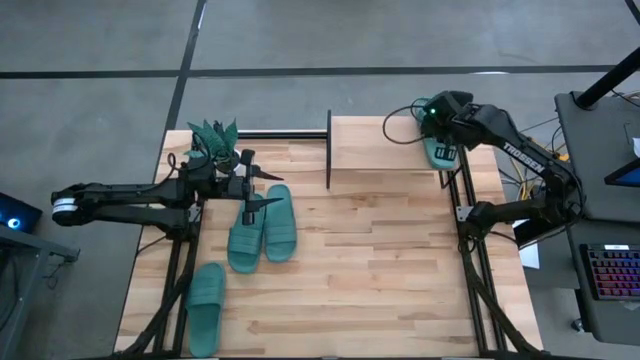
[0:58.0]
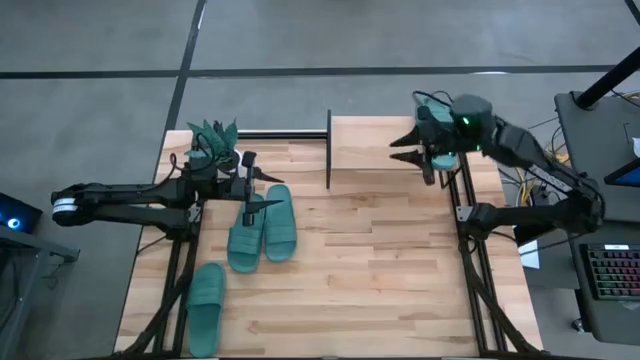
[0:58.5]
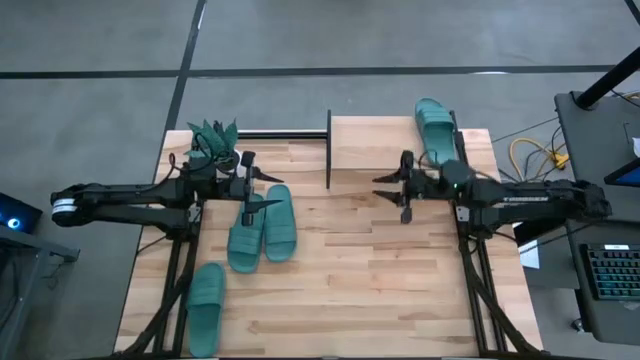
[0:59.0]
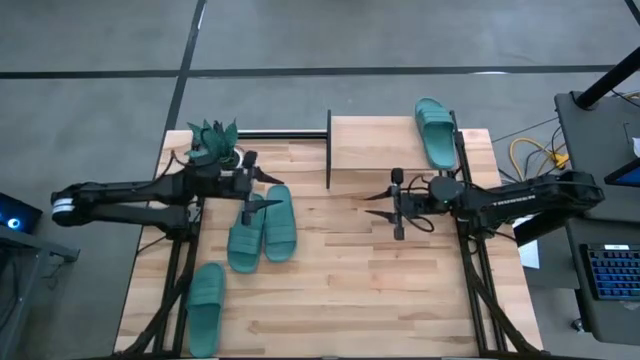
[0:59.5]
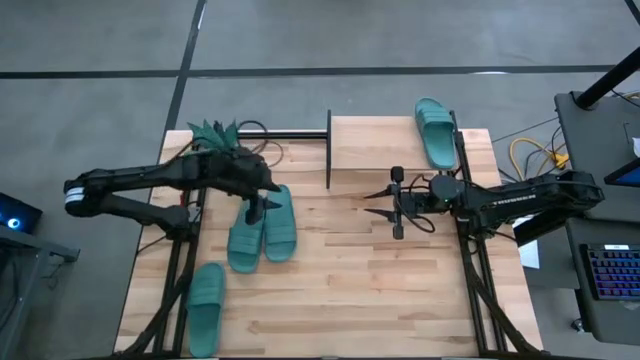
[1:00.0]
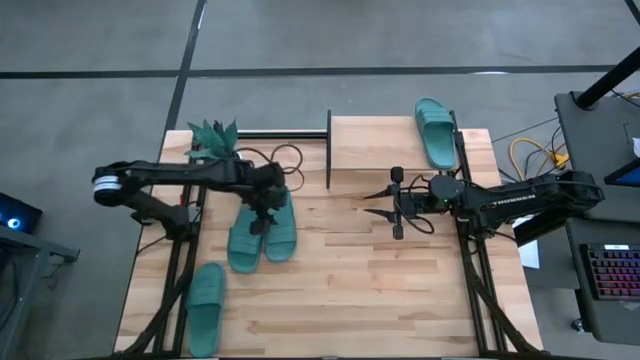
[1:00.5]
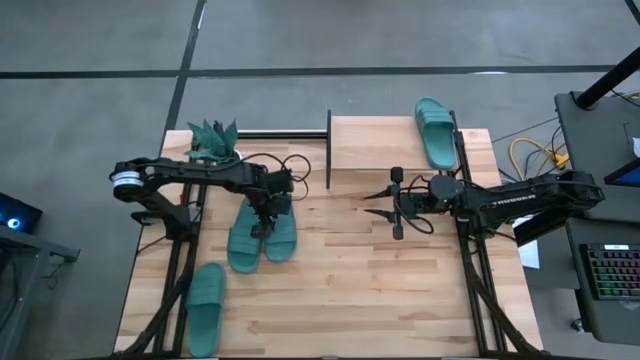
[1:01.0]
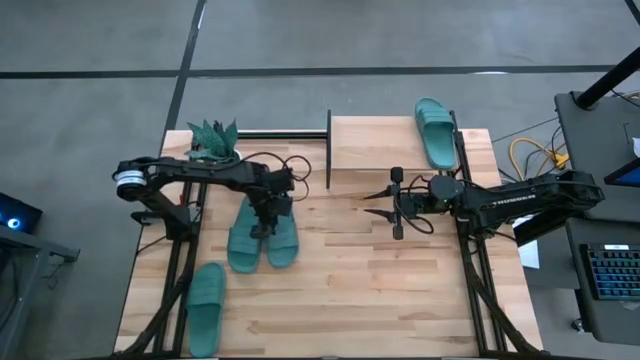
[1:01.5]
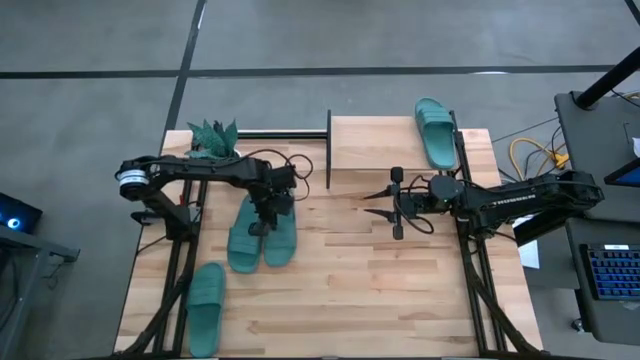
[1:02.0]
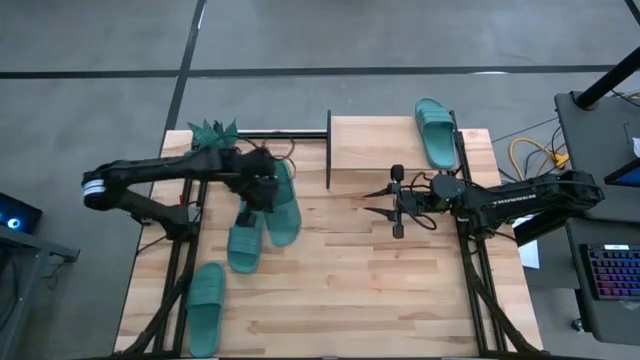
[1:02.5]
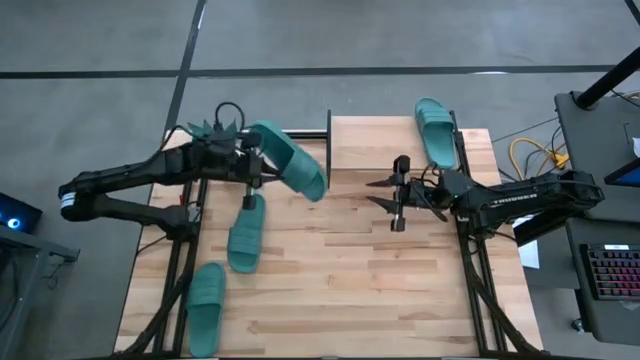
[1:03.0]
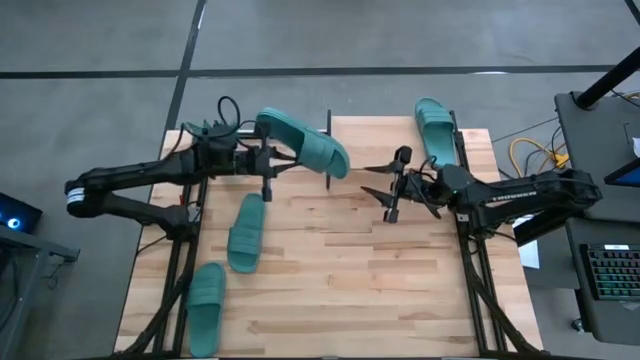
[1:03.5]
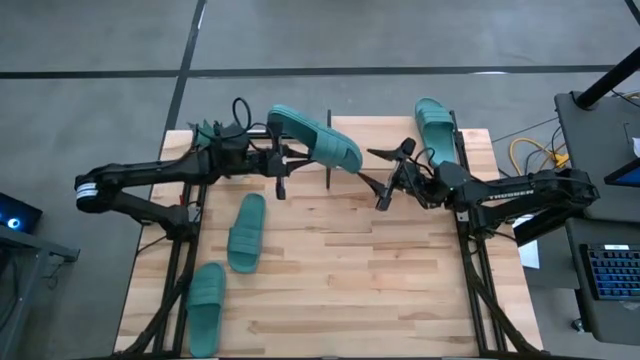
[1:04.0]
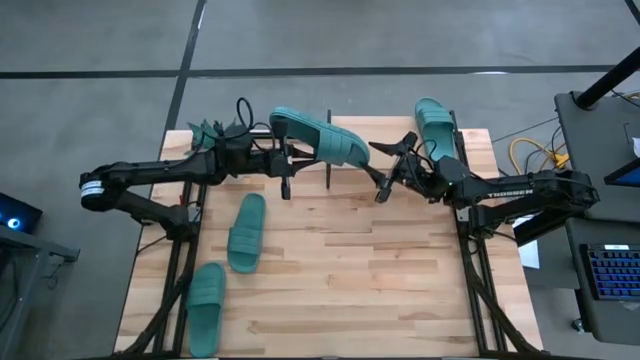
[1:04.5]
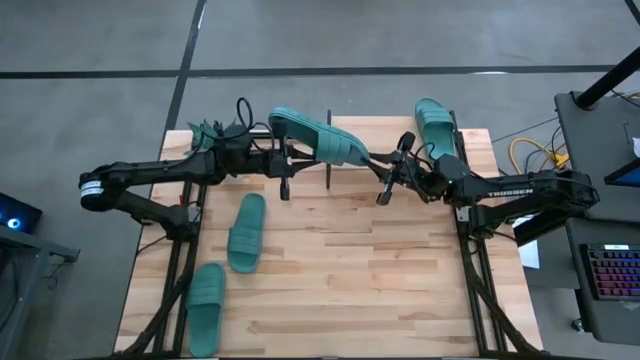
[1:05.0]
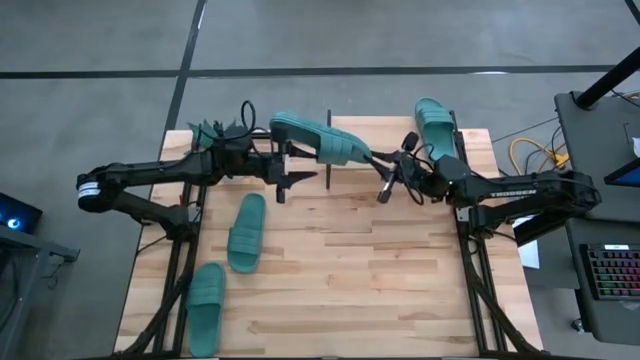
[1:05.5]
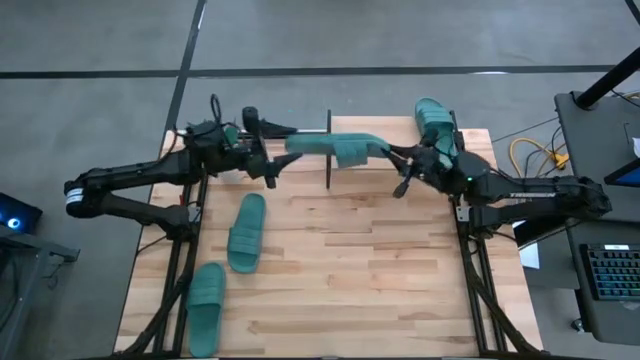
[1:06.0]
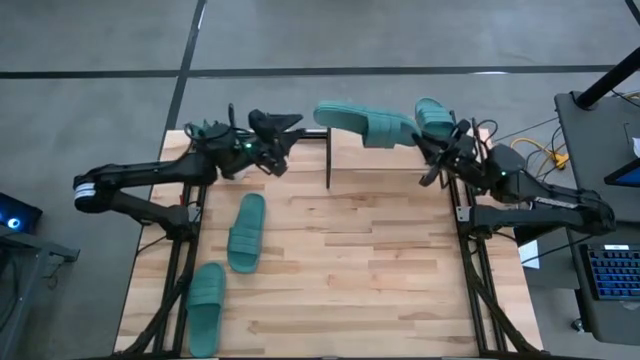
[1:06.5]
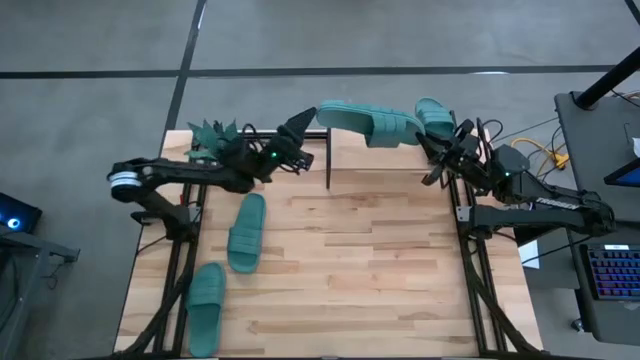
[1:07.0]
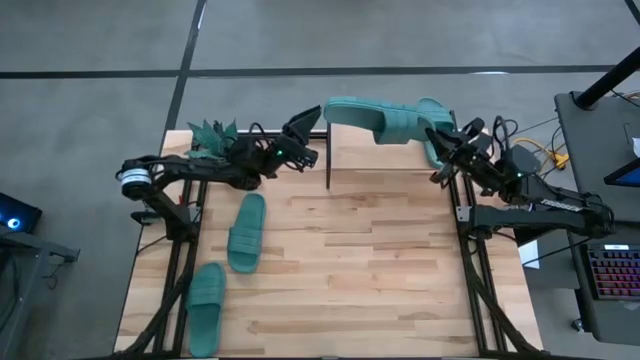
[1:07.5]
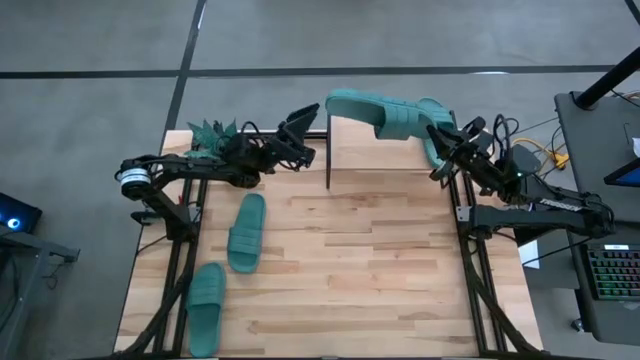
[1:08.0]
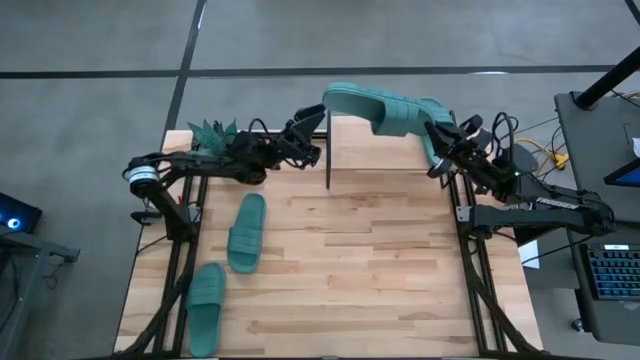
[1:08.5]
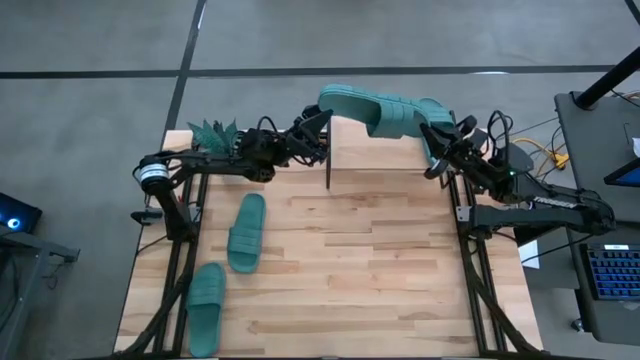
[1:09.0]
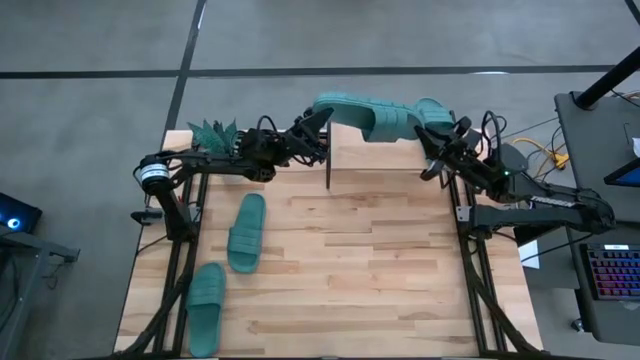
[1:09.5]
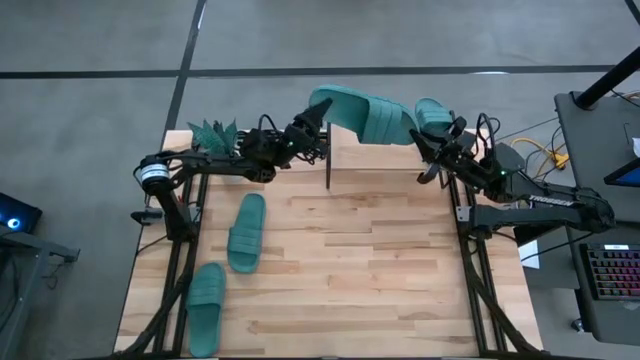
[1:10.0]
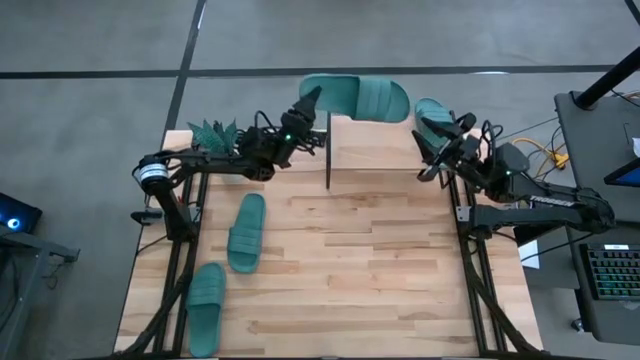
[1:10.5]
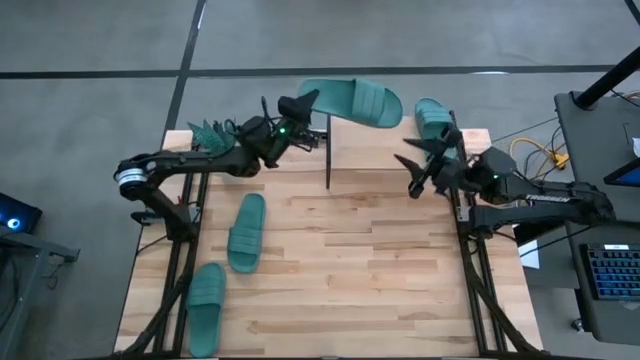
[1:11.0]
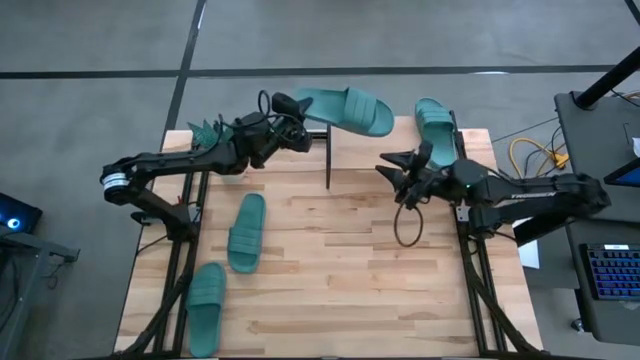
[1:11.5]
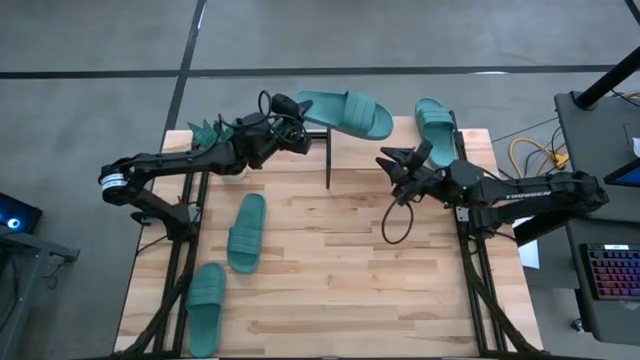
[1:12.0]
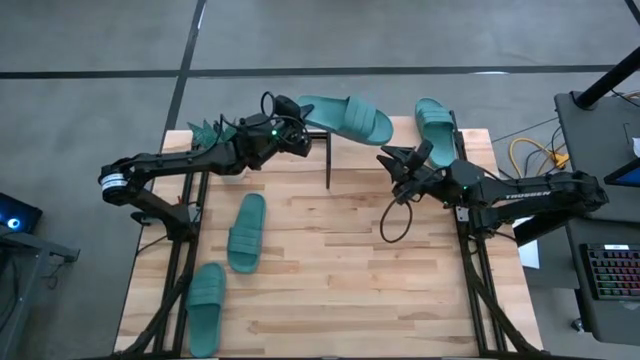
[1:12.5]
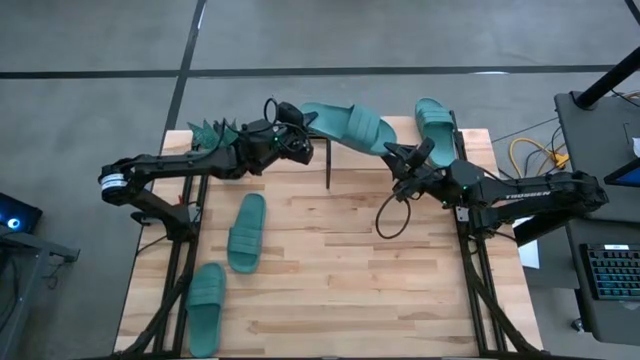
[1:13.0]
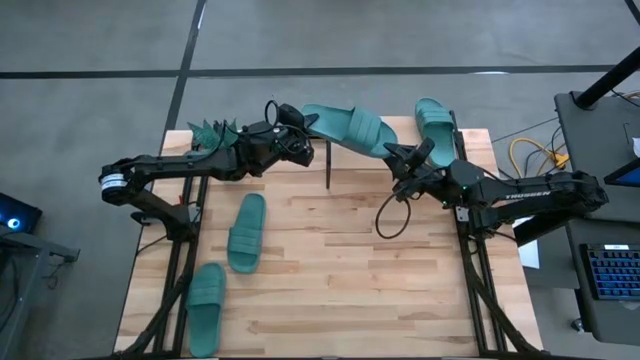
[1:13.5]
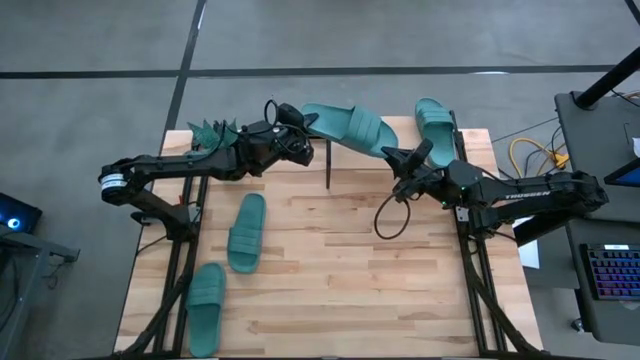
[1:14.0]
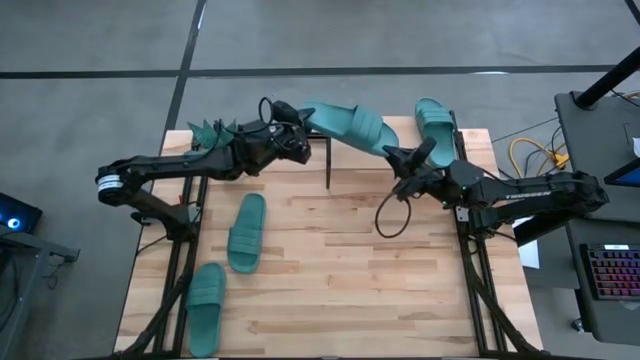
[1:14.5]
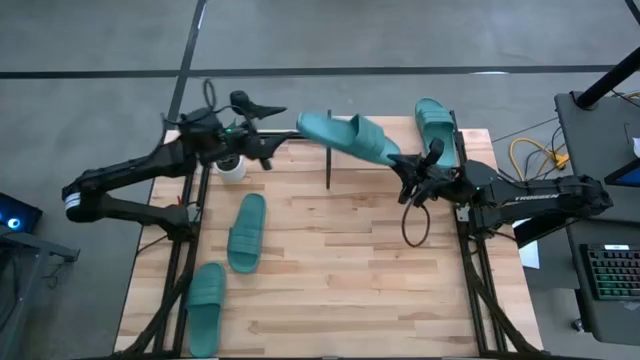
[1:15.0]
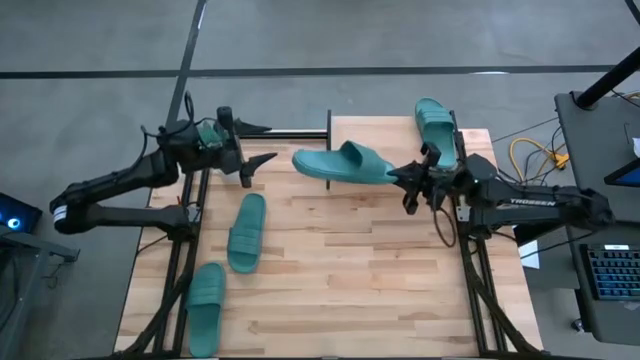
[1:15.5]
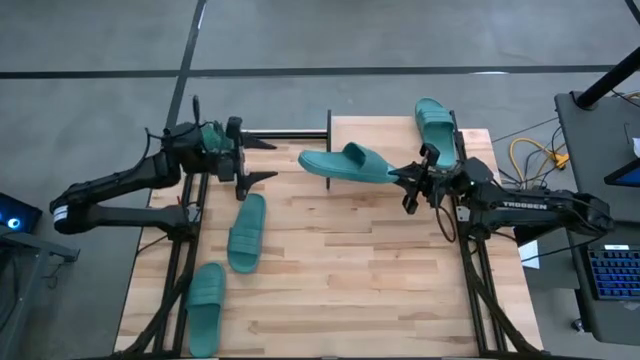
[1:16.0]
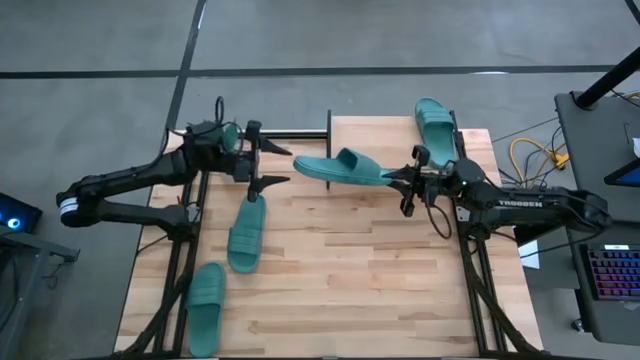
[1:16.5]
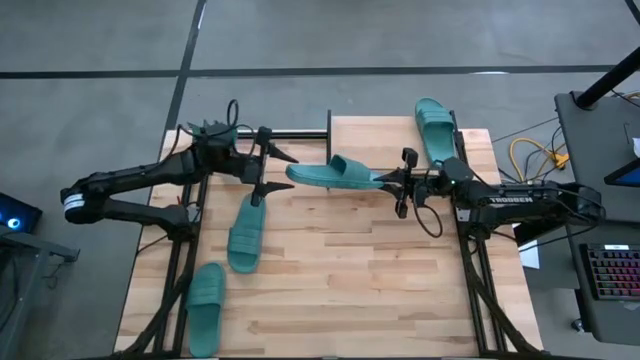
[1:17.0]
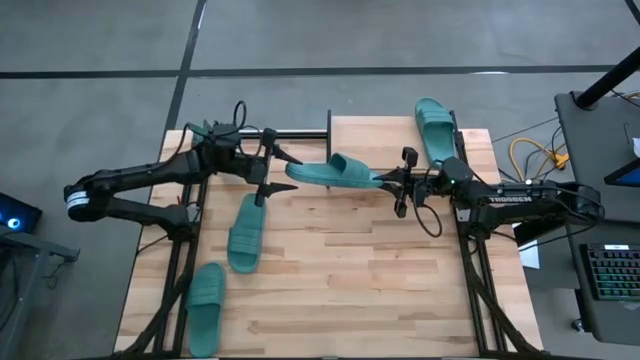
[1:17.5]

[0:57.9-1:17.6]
Task: Pick and place slides into the shelf
Put the top right green slipper on the shelf
